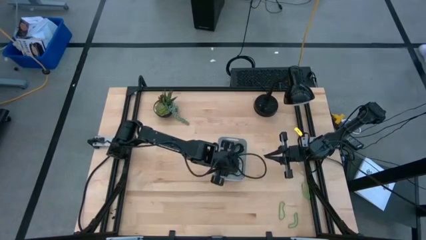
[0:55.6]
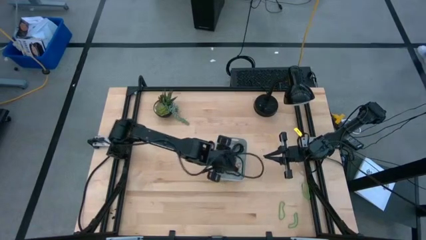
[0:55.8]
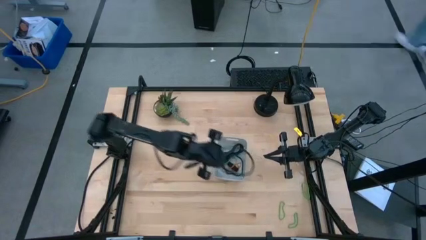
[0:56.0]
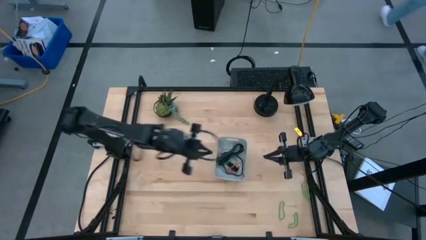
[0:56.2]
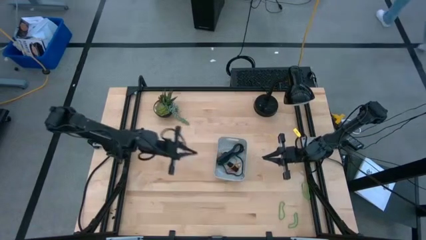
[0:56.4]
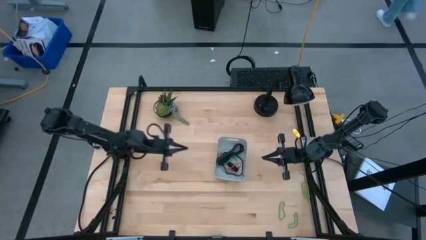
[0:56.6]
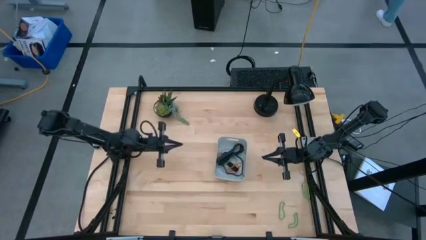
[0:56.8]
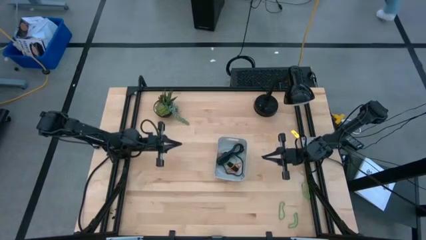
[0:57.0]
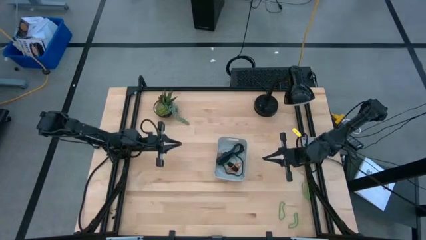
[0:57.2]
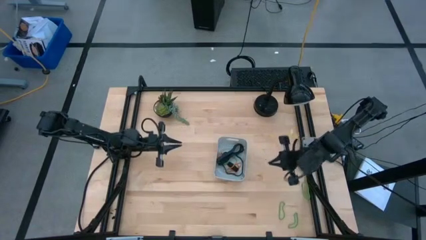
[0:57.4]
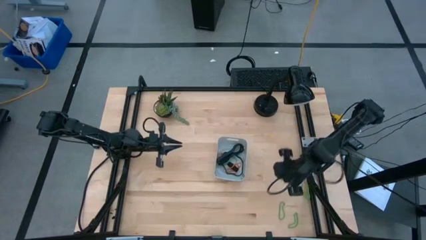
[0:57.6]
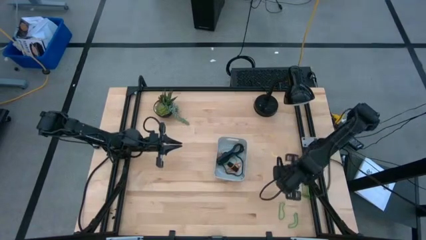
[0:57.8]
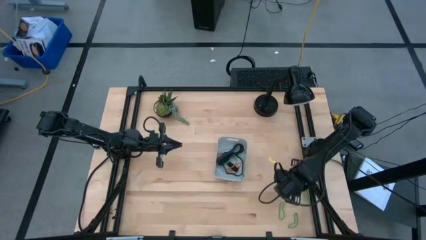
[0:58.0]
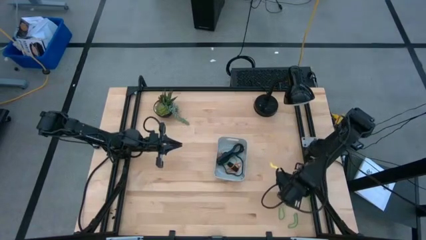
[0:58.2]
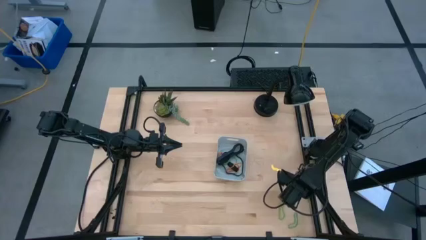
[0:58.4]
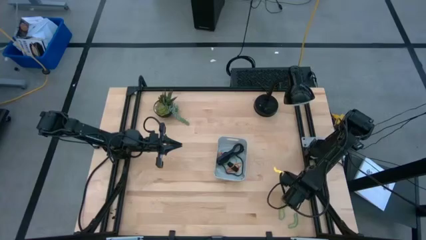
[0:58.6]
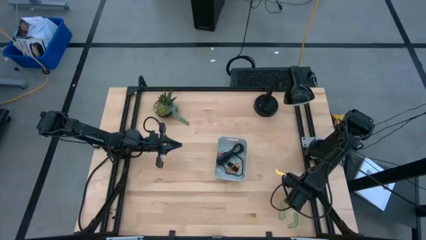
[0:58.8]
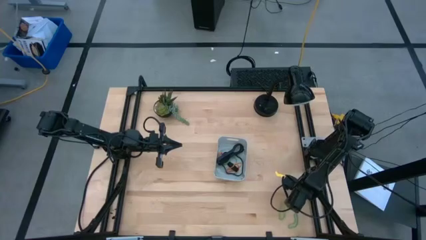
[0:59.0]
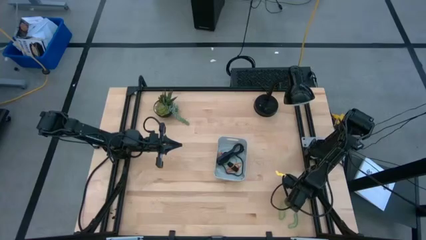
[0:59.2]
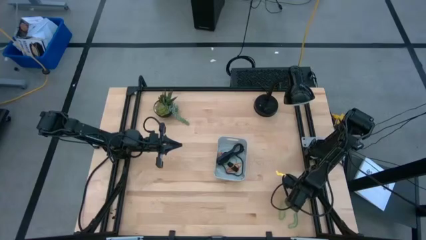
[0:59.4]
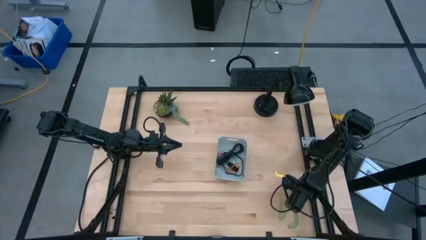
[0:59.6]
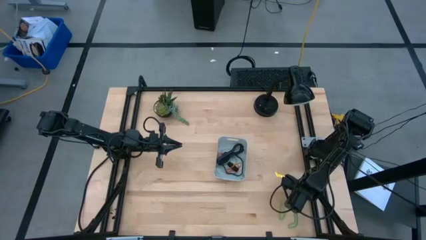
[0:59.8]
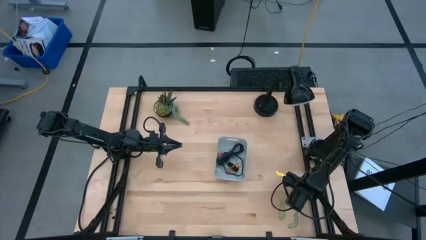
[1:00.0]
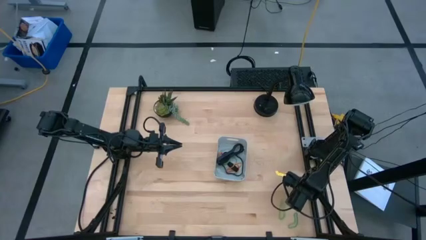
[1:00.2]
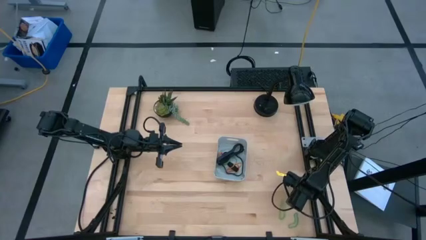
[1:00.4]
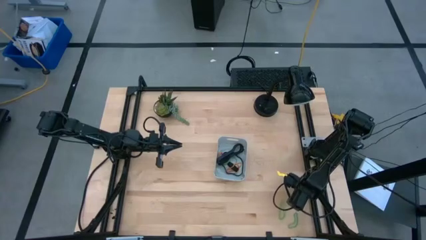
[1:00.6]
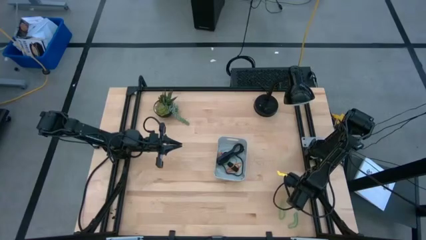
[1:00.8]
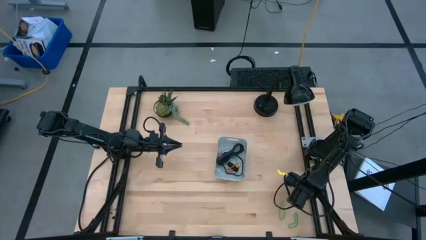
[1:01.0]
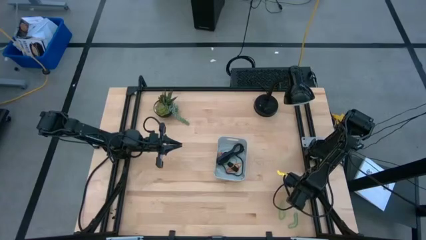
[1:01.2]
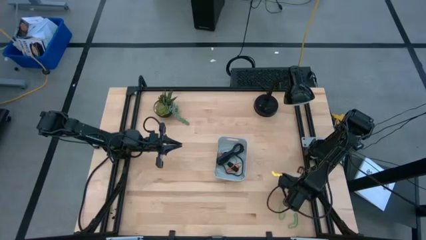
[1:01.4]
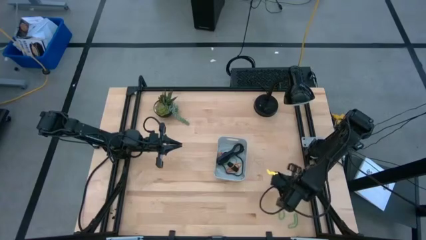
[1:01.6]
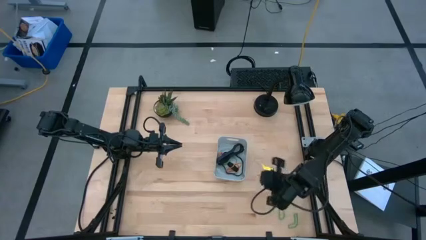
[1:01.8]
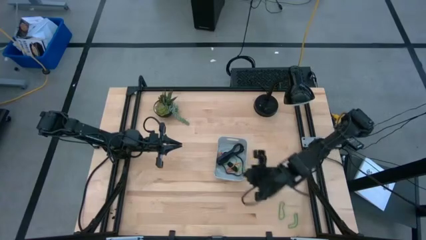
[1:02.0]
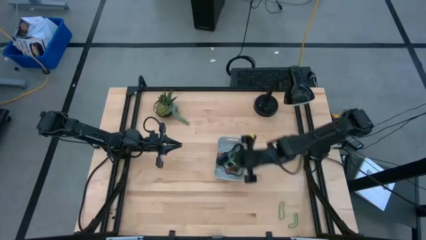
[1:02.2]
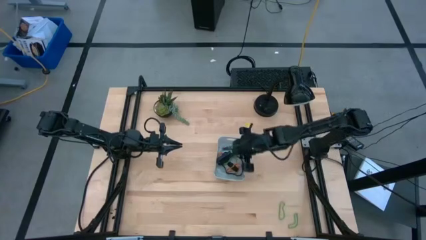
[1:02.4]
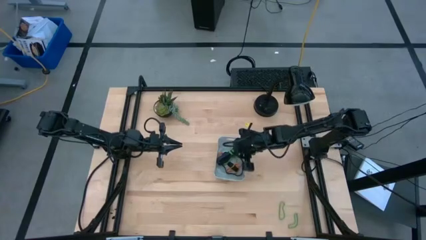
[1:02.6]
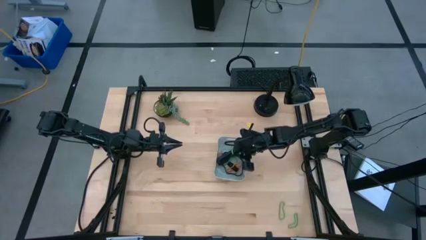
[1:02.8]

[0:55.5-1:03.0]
Task: Pick and place rubber bands into bin
Put the green rubber band into the white bin

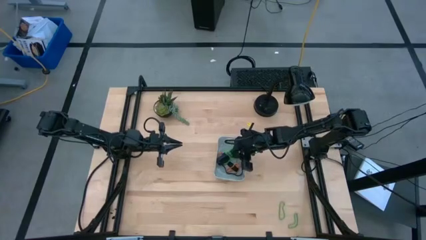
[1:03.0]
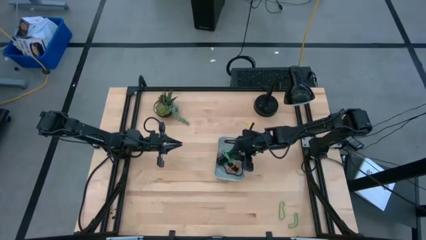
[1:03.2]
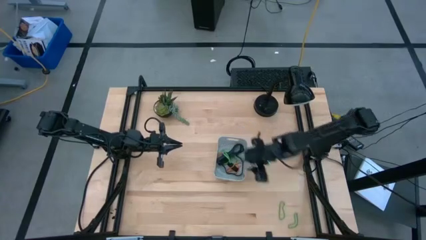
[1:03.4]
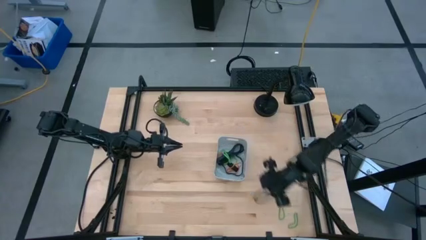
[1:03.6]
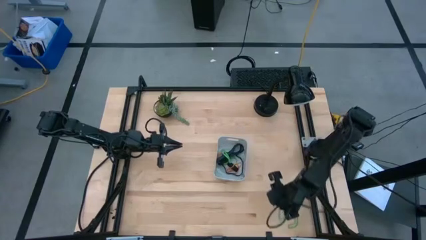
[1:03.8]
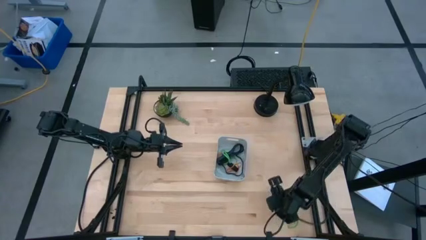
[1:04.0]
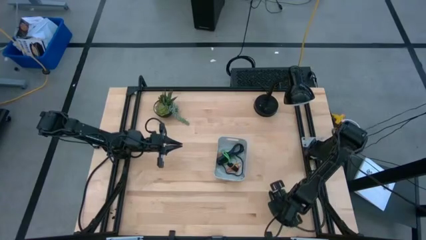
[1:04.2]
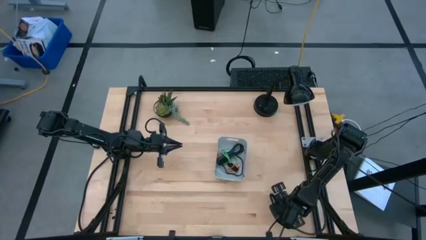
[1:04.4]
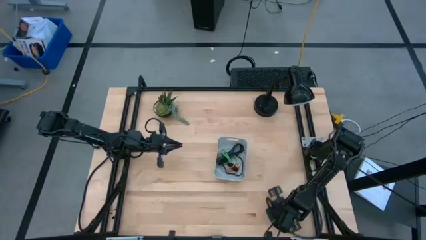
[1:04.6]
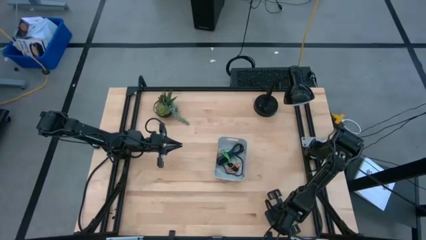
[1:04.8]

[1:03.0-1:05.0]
Put the green rubber band into the white bin

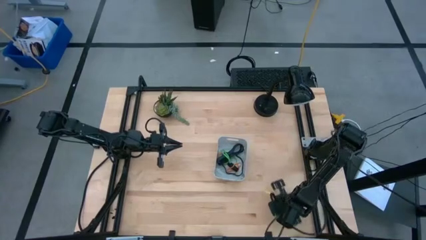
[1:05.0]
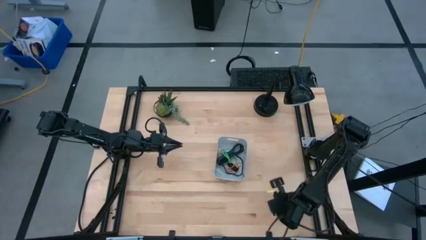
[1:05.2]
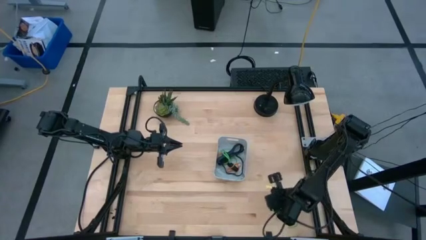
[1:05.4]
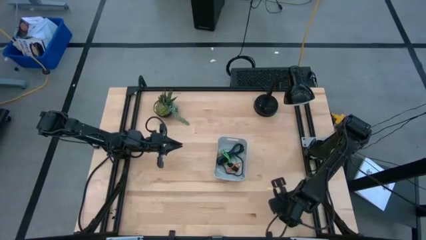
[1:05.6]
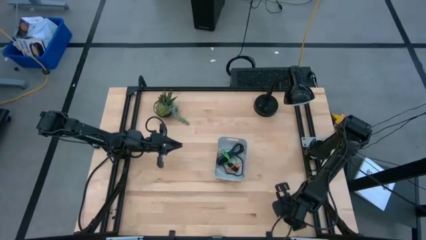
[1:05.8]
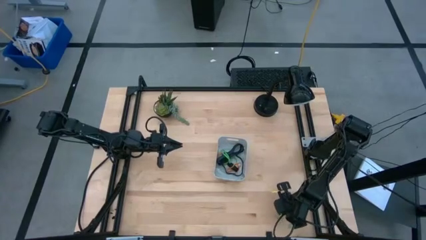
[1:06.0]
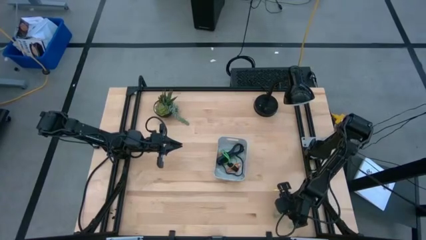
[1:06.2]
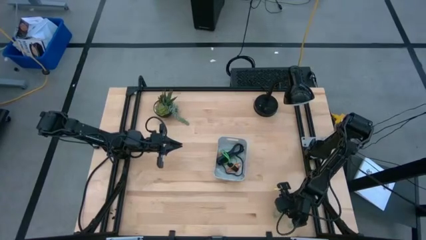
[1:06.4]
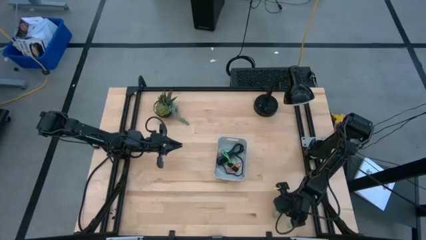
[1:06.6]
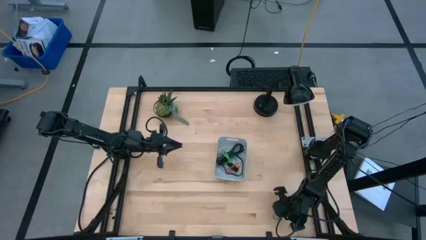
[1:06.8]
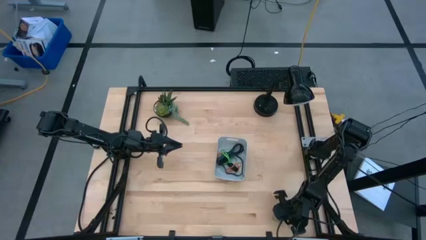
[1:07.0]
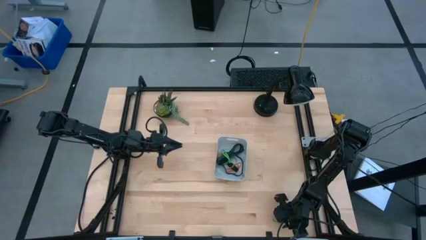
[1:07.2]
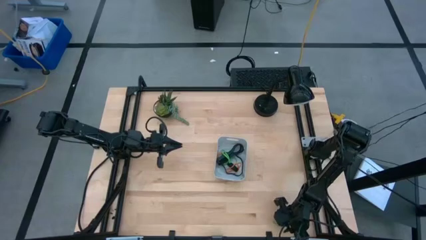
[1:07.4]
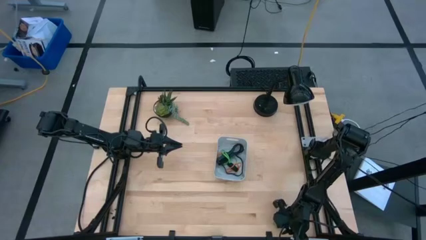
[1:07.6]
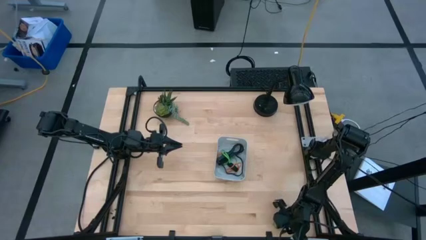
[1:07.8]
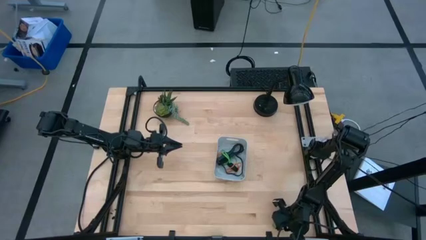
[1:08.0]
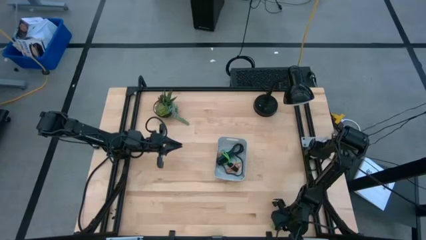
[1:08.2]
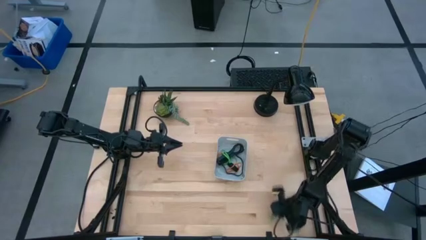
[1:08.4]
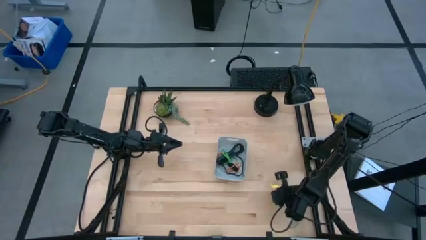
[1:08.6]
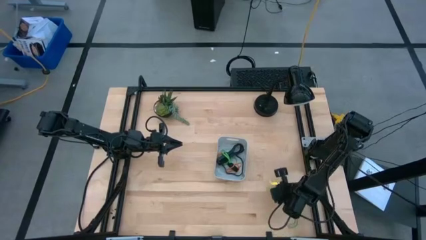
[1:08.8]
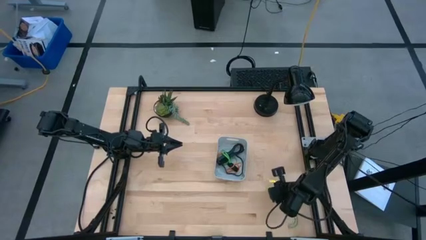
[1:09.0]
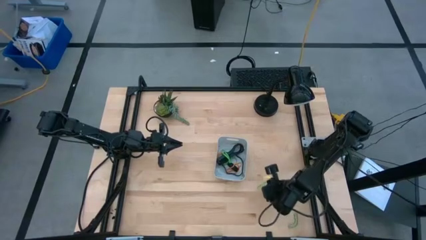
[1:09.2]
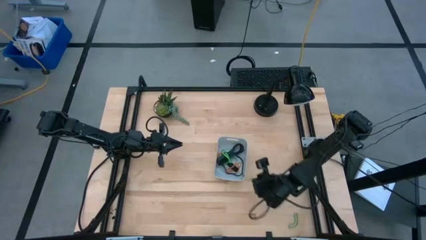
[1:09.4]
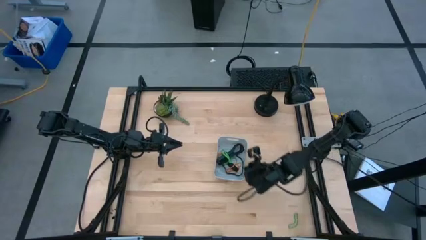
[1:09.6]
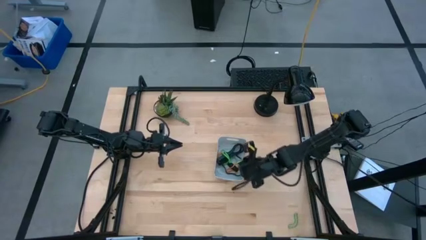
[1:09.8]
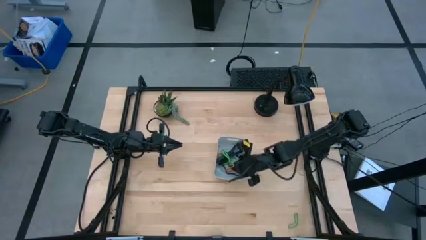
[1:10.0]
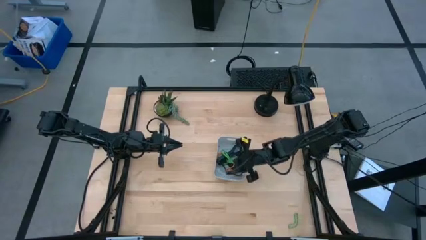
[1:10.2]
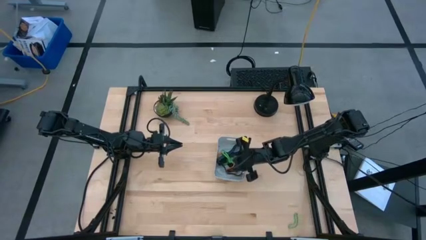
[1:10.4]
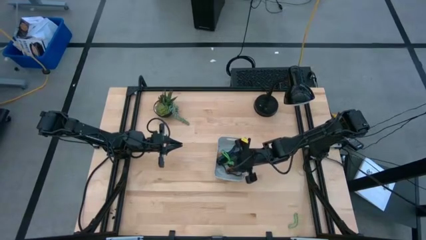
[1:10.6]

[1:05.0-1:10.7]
Put the green rubber band into the white bin

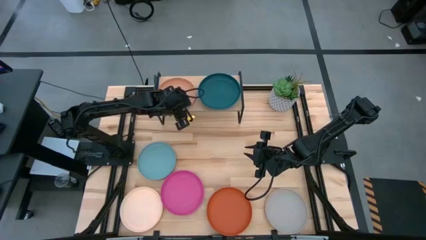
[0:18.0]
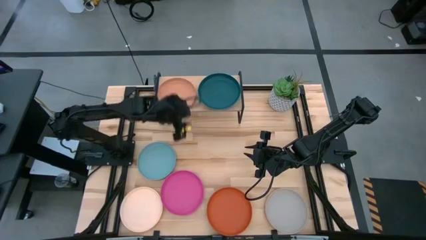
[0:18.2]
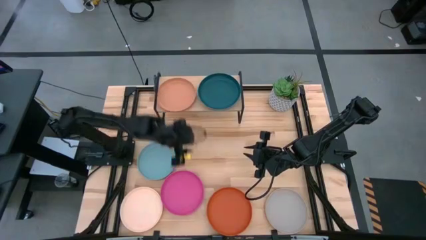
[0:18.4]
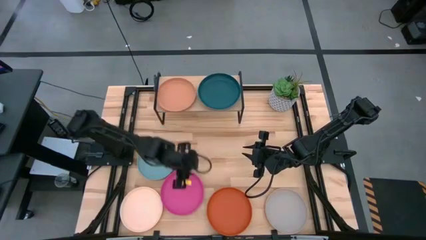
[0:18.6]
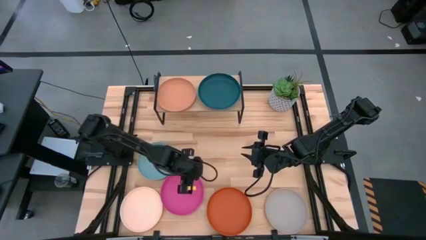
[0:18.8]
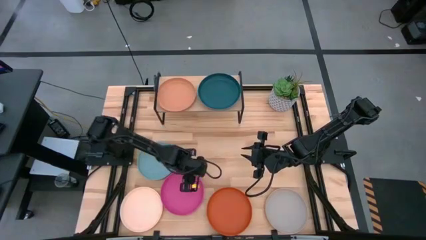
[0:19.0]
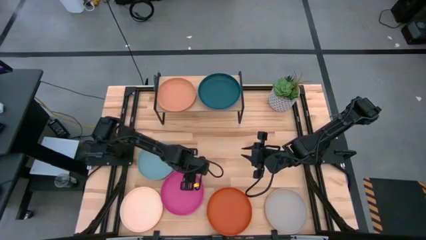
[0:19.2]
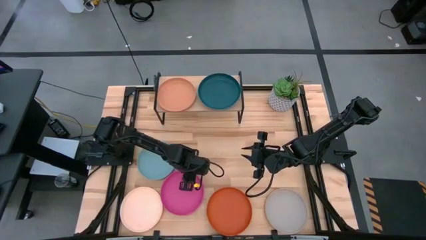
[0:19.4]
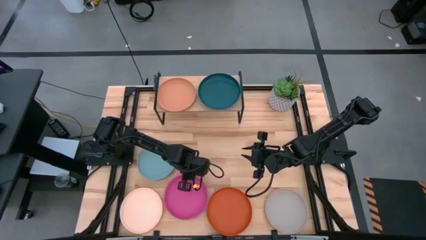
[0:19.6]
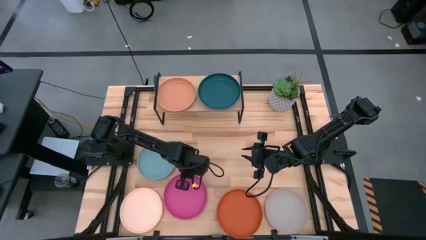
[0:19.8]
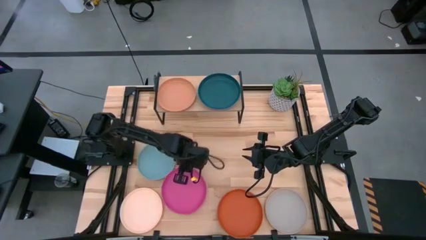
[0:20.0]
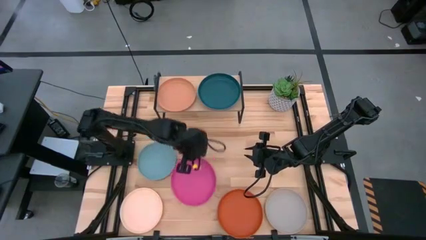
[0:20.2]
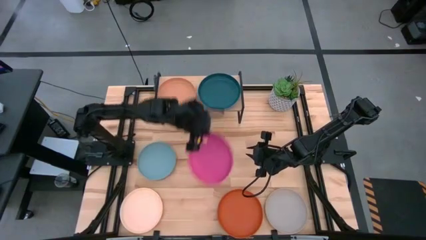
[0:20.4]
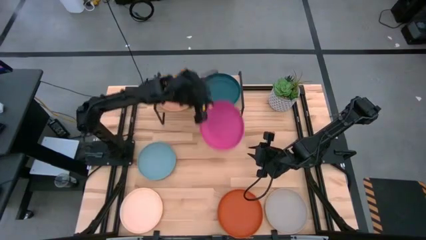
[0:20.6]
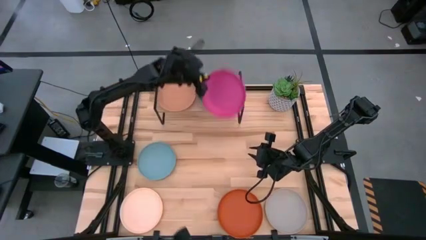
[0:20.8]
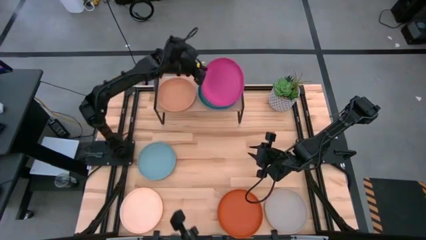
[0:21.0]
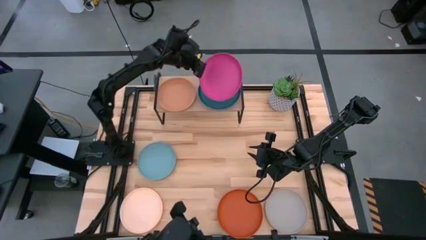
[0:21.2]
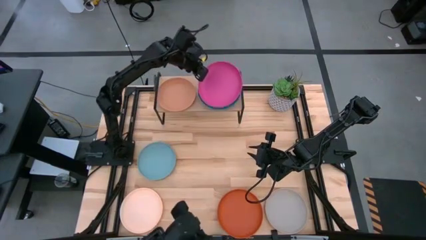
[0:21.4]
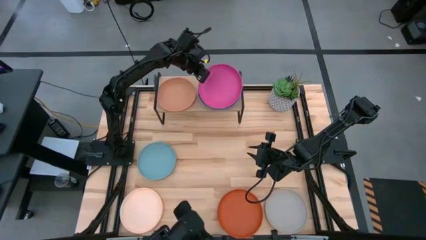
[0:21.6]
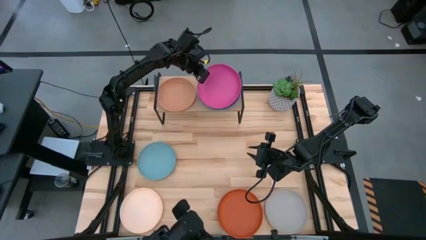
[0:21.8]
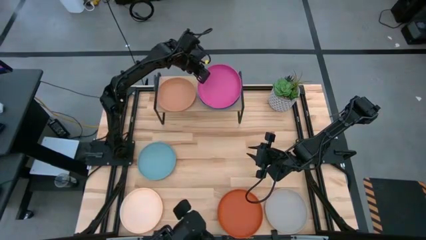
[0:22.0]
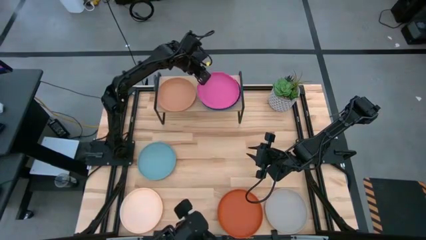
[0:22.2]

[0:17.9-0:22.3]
Task: Place and stack plates onto a shelf
Stack the pink plate on top of the green plate on the shelf
